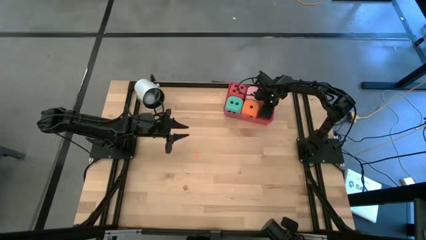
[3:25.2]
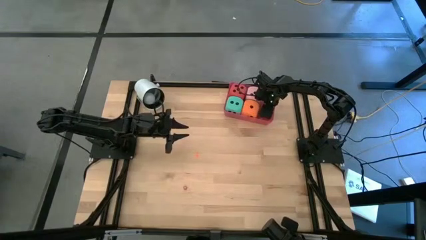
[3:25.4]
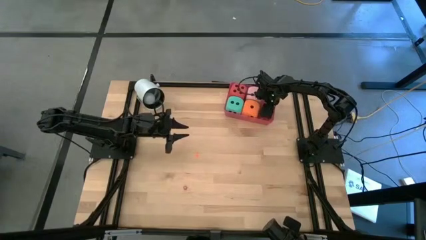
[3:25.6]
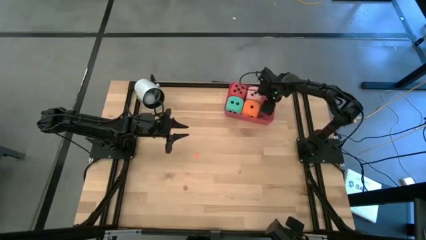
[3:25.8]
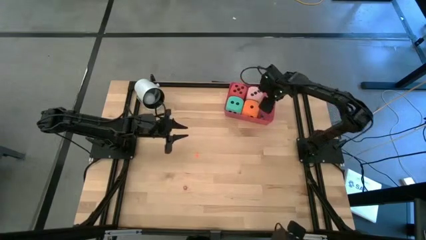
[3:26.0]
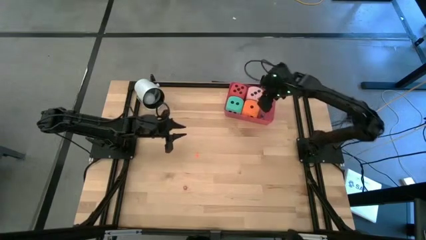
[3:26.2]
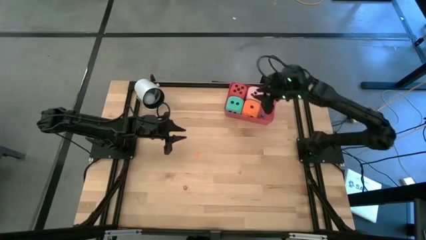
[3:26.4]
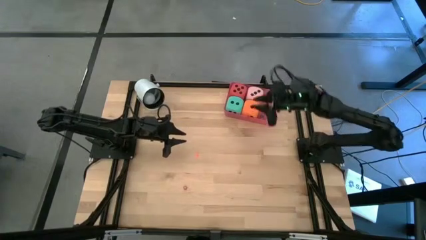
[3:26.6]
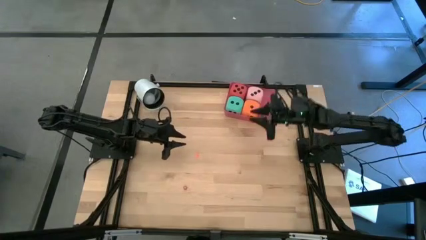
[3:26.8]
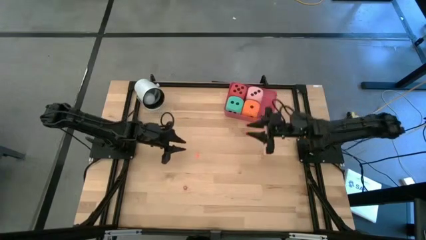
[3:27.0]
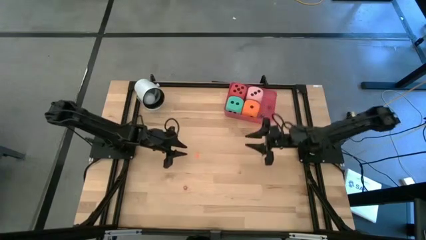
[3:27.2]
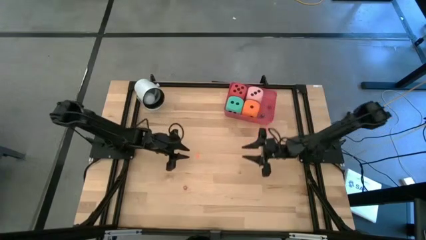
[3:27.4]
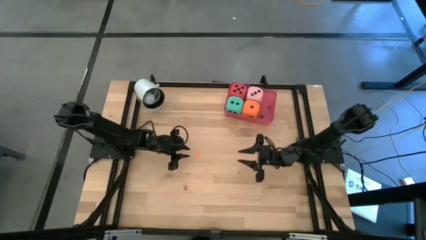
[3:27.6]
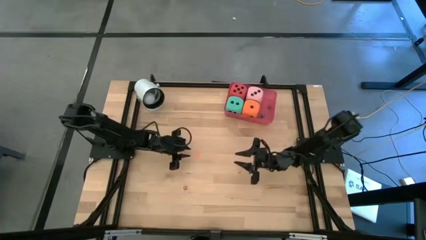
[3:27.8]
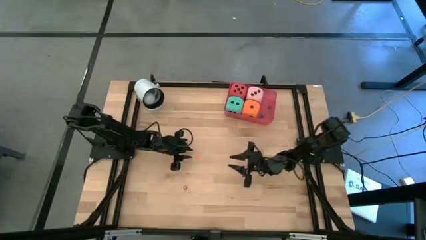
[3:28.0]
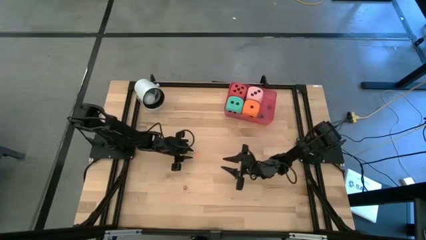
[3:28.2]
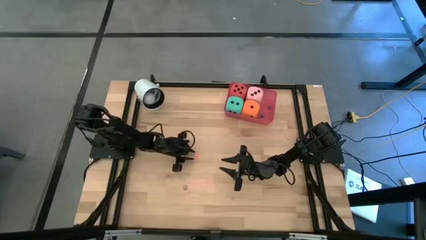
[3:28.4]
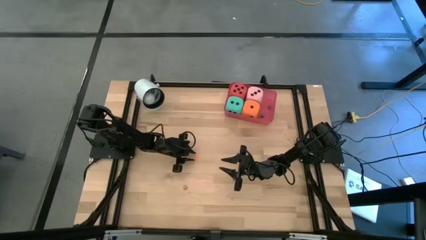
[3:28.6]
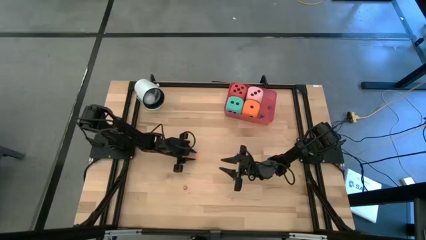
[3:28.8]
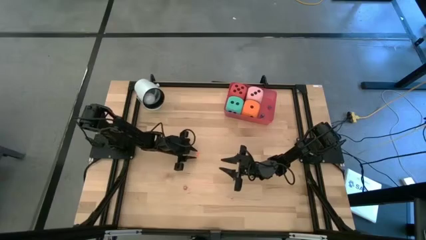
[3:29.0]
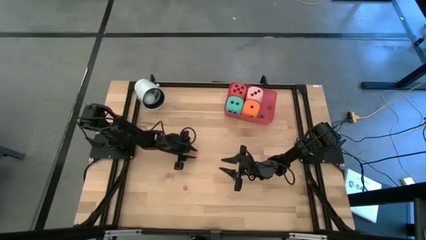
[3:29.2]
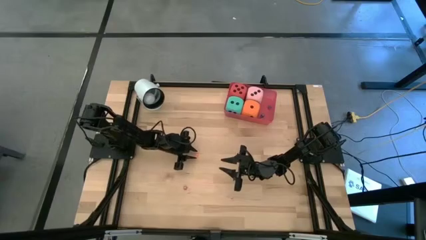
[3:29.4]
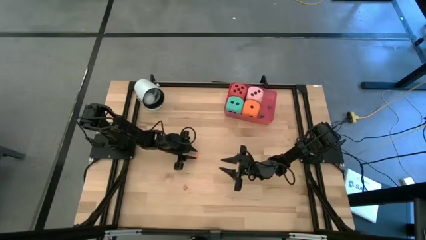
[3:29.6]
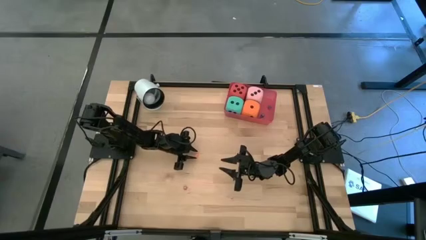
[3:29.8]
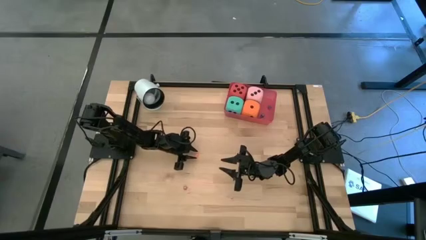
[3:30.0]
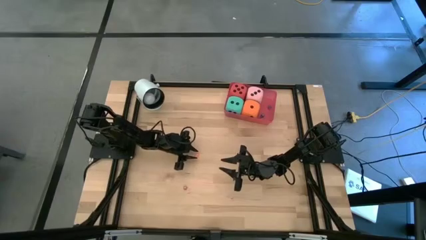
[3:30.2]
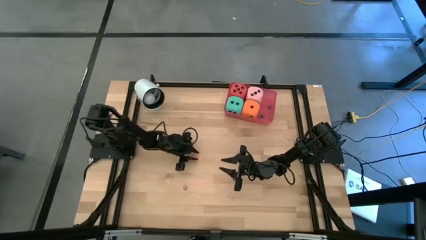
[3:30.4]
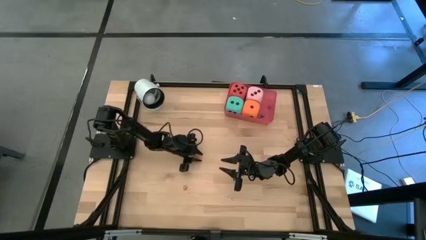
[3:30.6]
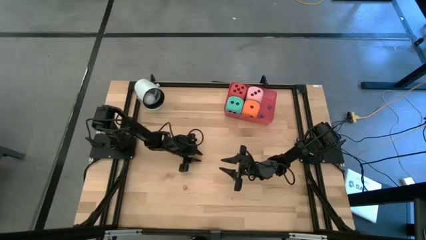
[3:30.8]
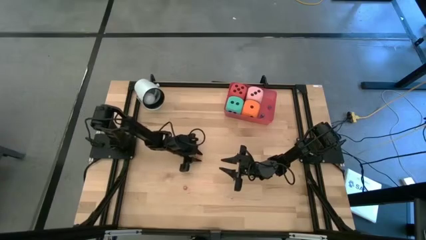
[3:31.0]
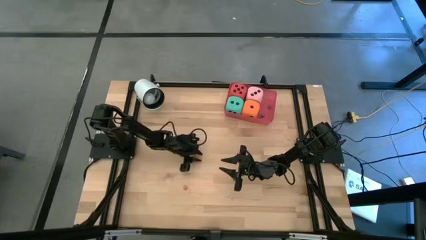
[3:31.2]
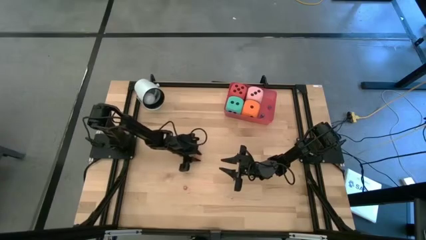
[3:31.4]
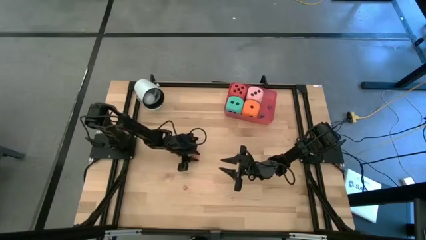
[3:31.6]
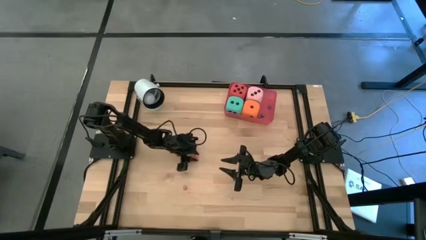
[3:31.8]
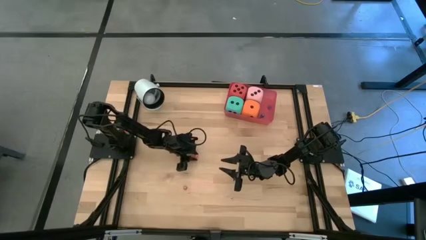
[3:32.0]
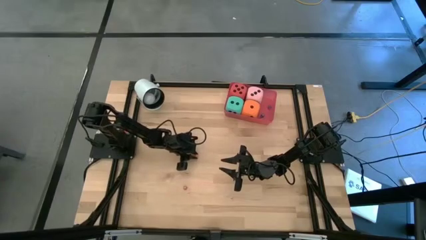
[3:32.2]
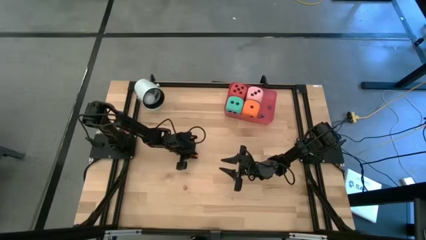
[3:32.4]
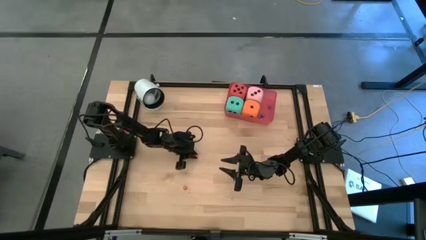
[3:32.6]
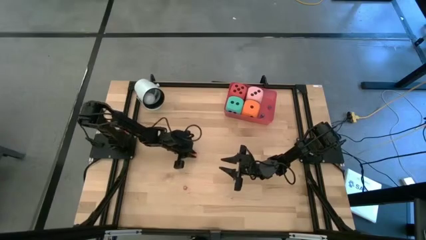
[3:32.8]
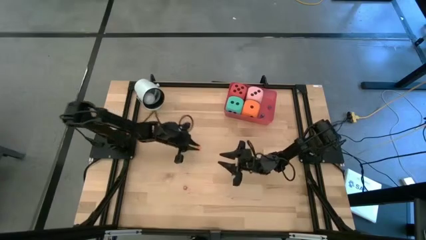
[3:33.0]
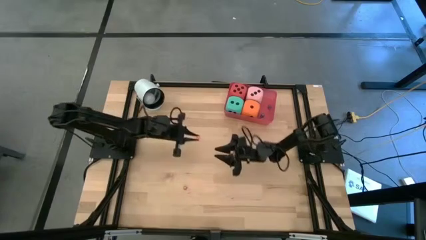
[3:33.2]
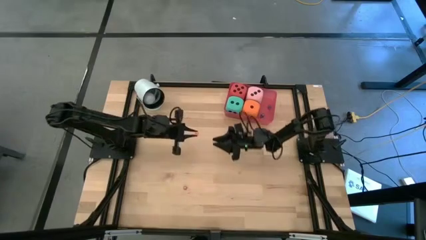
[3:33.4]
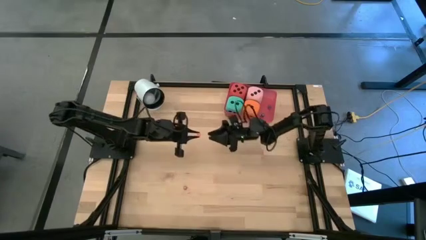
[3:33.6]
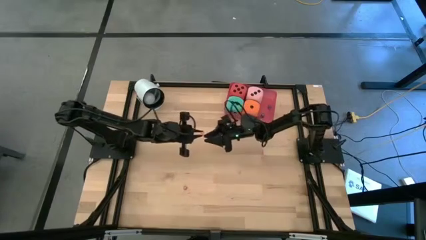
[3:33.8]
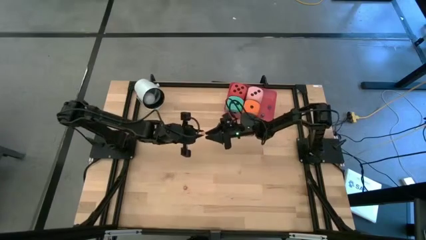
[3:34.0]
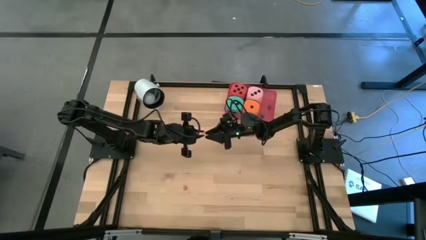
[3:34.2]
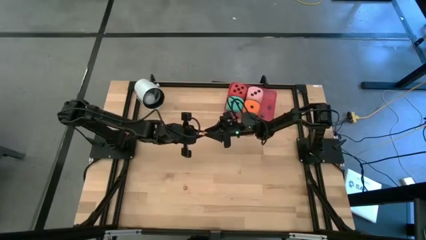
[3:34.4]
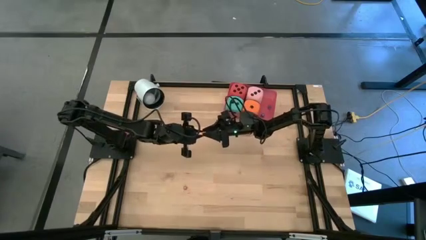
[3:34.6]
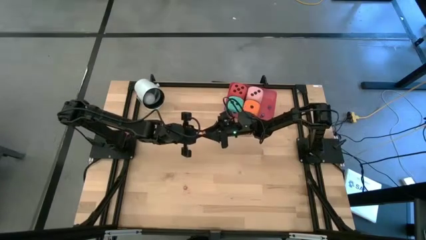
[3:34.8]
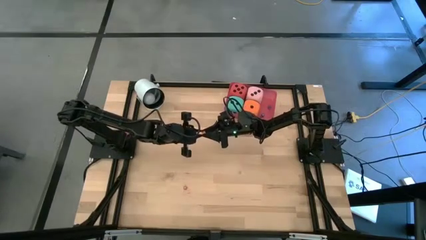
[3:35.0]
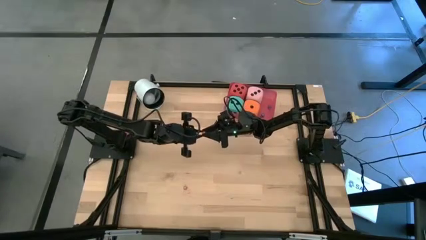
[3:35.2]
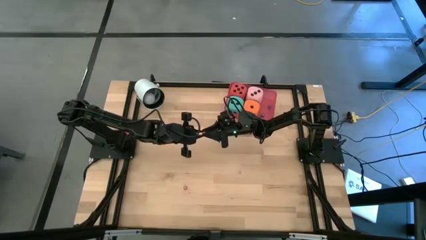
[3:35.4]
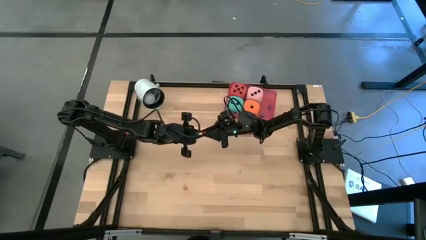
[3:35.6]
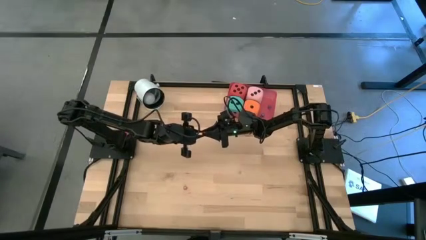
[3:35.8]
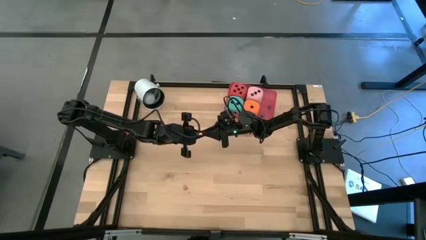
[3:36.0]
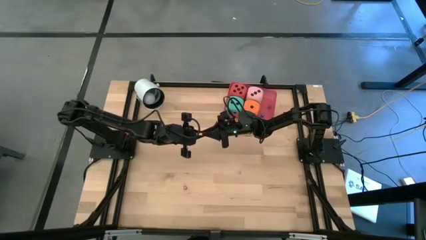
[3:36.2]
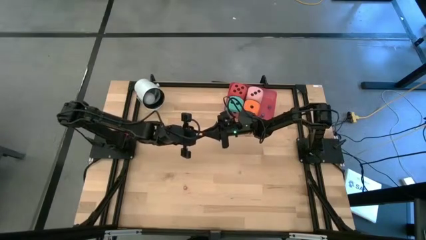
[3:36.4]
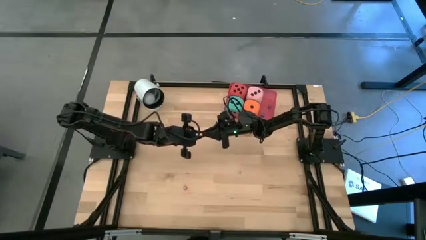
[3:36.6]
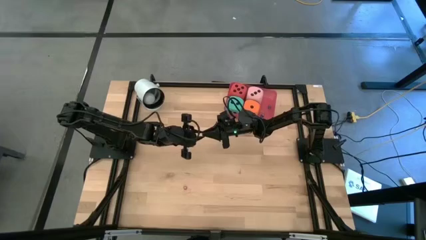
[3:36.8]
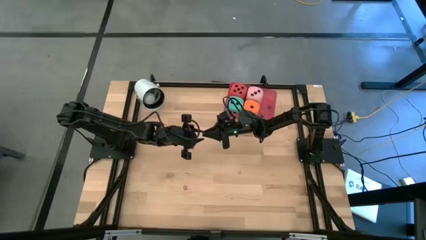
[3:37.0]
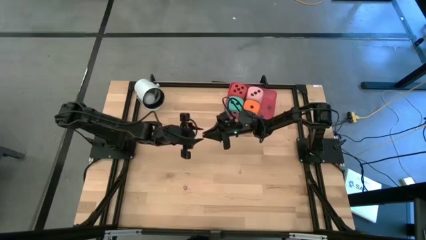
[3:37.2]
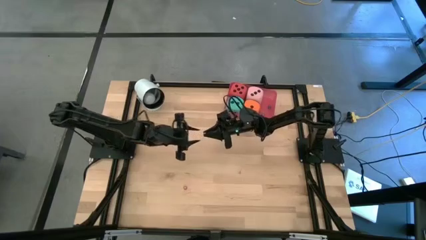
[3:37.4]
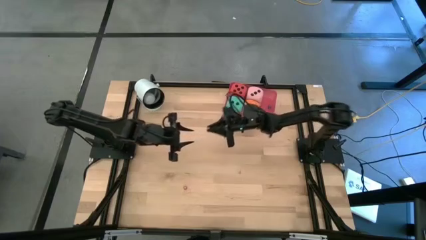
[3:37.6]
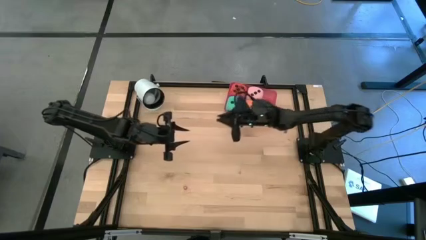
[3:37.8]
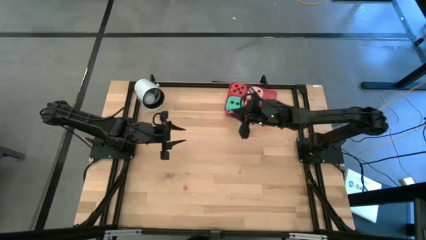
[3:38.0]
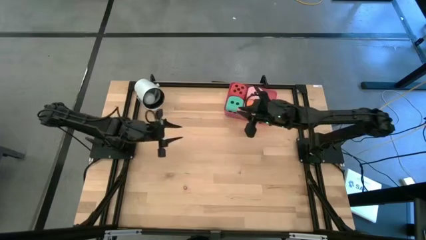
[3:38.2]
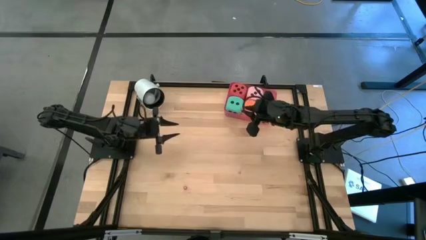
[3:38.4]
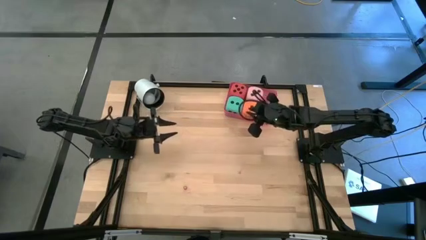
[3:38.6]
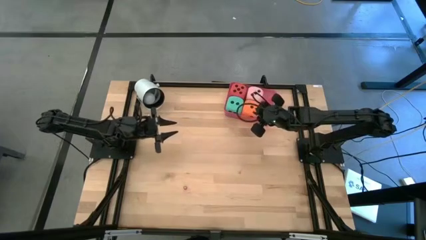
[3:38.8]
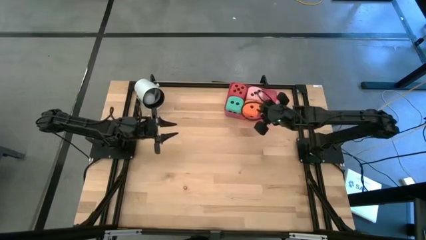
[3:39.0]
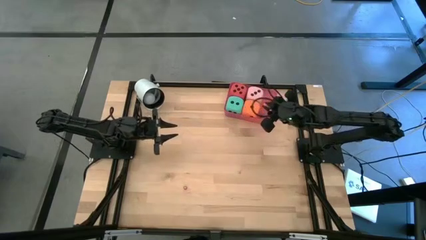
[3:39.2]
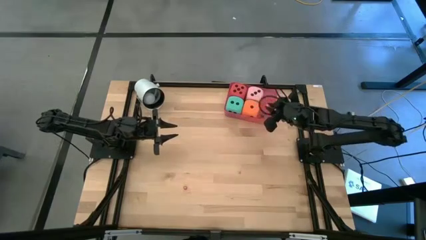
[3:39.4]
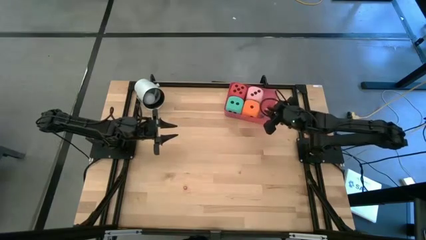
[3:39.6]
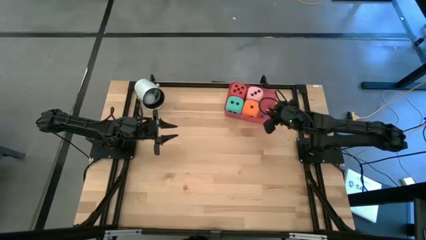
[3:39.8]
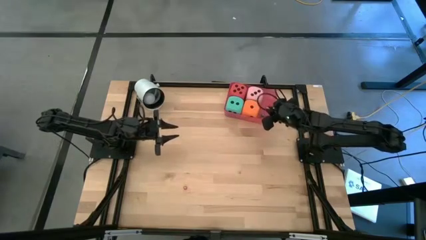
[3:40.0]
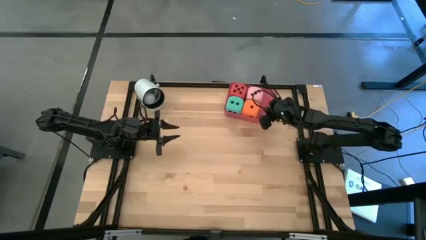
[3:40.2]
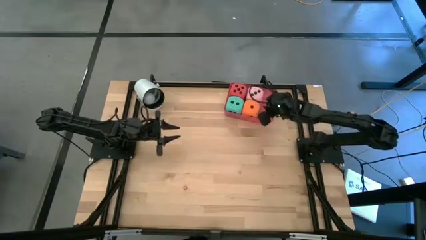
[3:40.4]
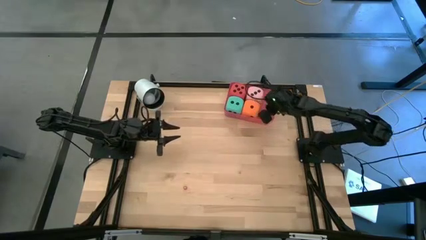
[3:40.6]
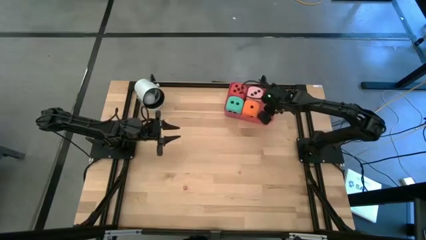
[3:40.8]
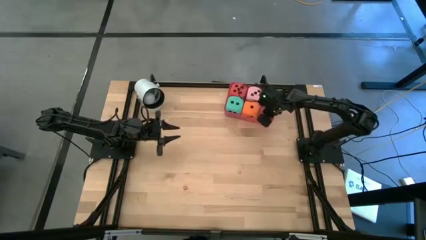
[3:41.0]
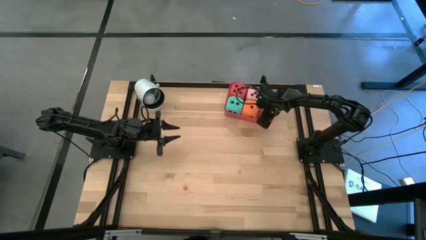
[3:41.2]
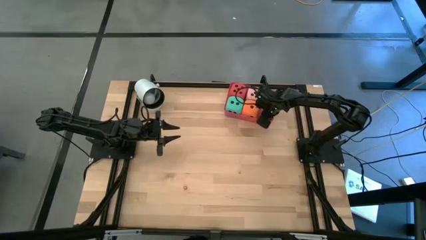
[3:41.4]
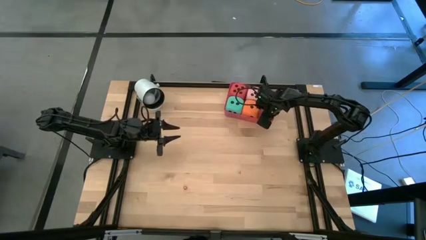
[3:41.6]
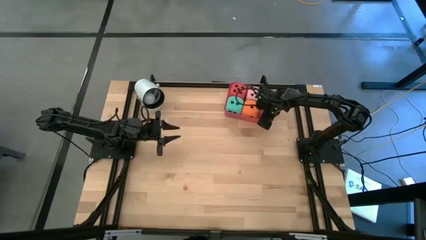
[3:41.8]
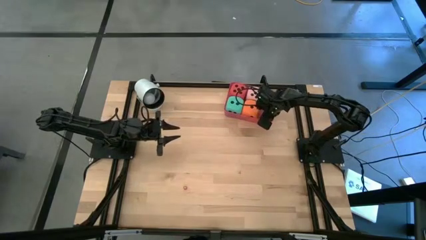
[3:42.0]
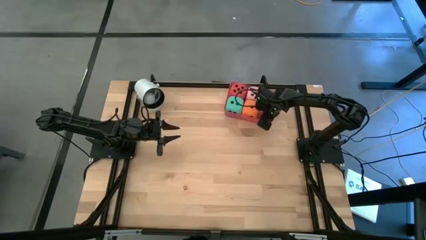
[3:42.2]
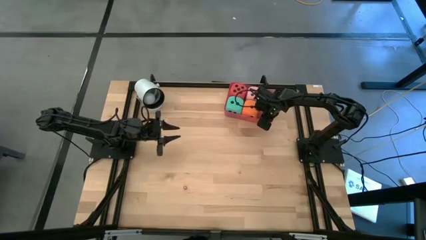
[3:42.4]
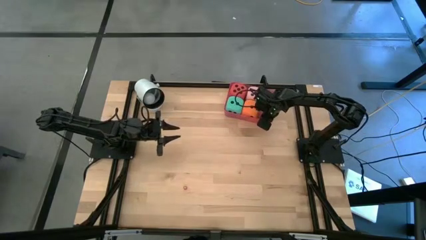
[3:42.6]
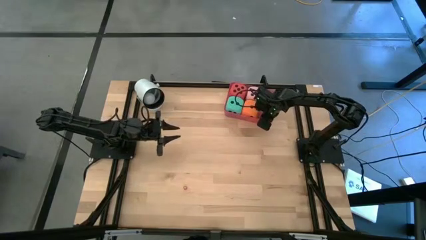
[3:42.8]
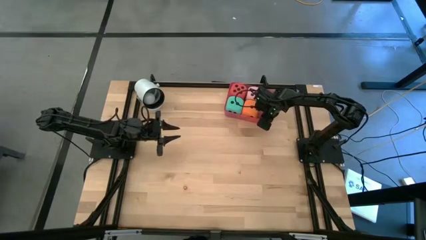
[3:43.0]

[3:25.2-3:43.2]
Task: Pick & Place Dice
Put the small orange dice into the red bin
